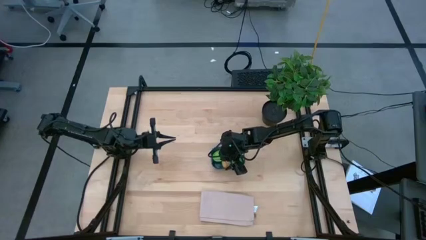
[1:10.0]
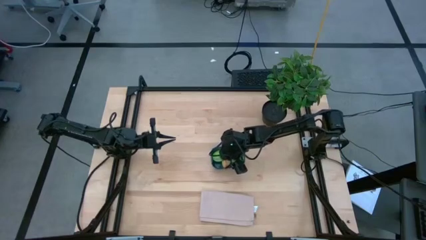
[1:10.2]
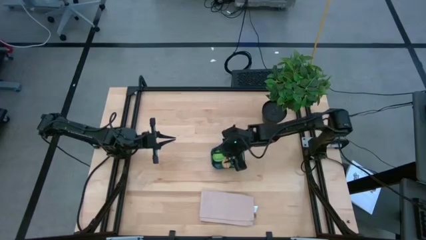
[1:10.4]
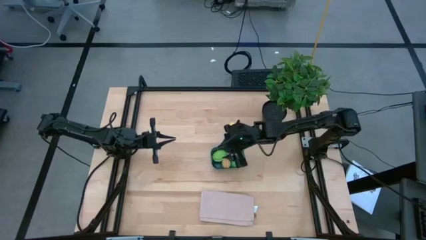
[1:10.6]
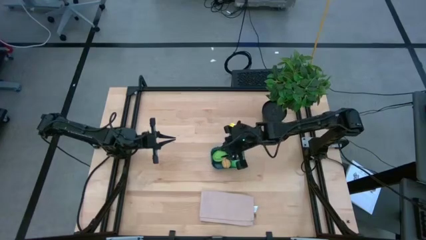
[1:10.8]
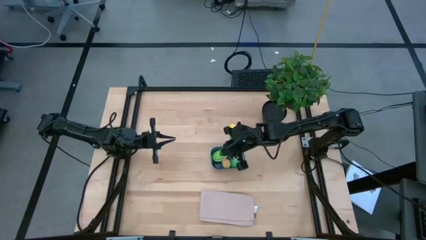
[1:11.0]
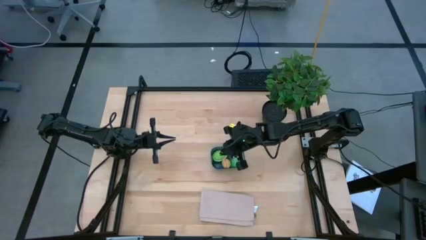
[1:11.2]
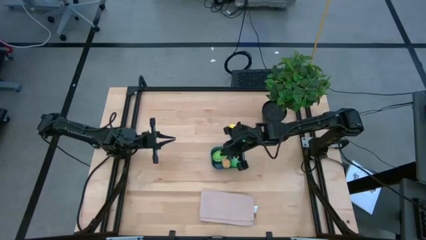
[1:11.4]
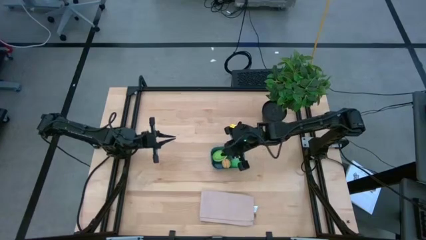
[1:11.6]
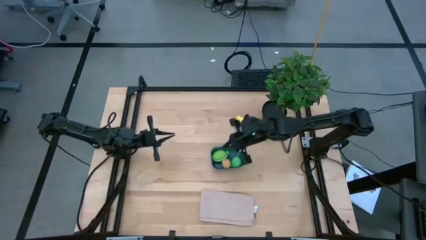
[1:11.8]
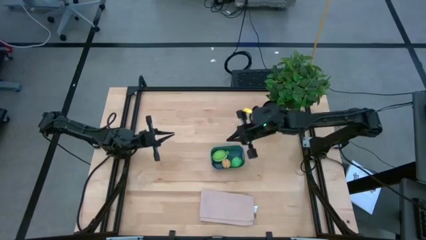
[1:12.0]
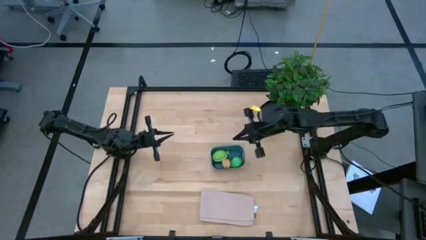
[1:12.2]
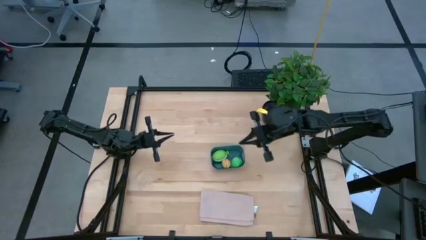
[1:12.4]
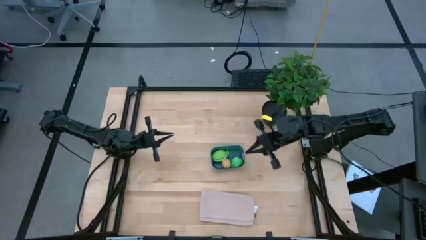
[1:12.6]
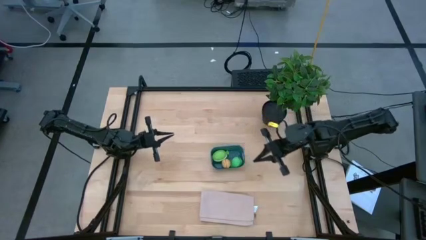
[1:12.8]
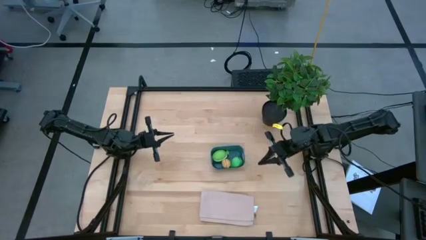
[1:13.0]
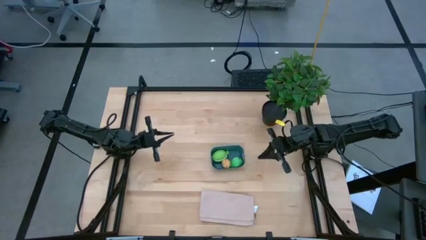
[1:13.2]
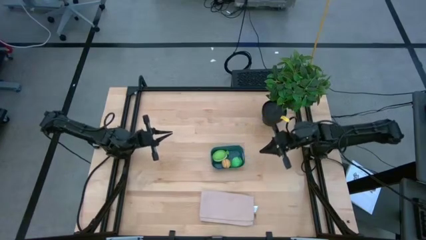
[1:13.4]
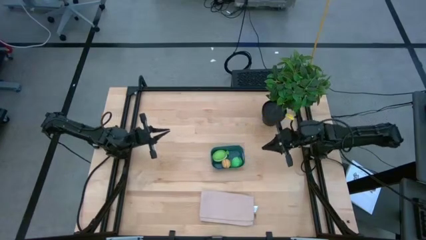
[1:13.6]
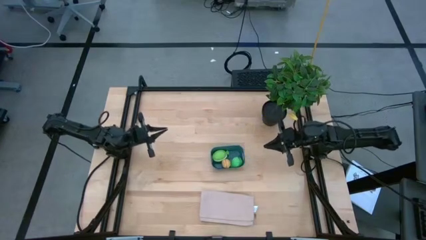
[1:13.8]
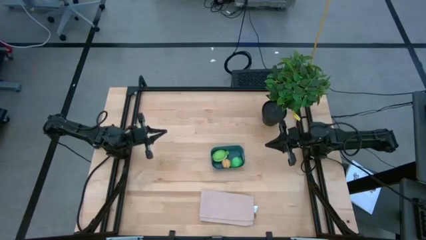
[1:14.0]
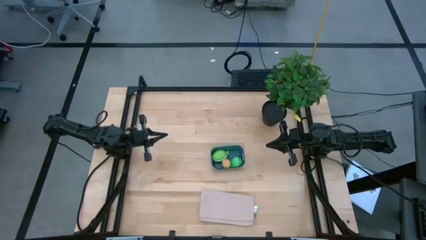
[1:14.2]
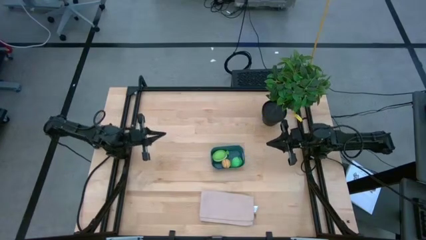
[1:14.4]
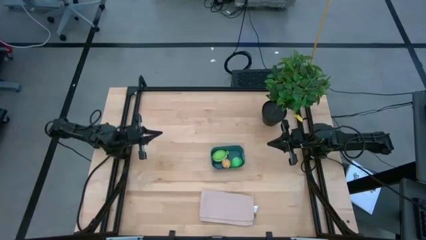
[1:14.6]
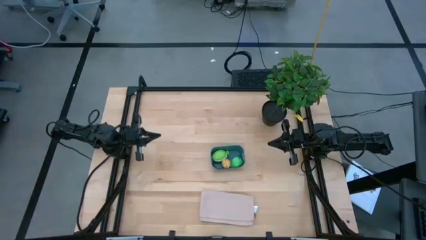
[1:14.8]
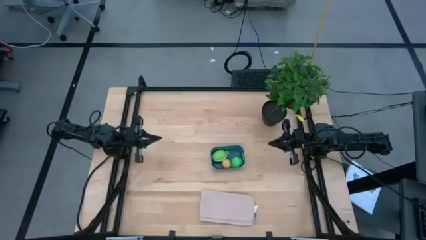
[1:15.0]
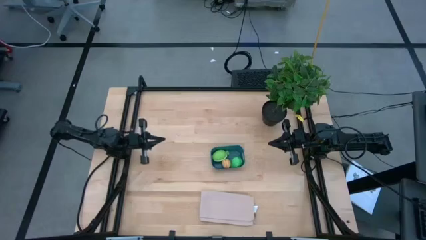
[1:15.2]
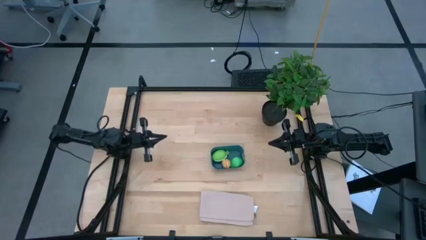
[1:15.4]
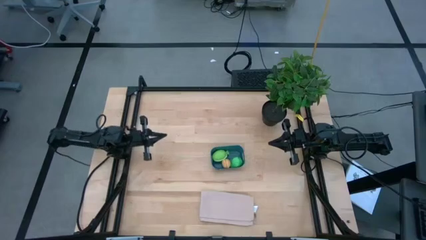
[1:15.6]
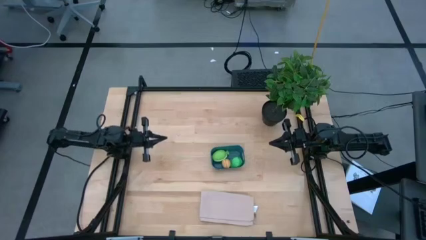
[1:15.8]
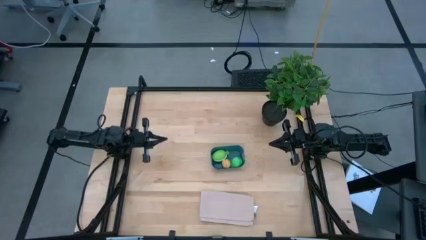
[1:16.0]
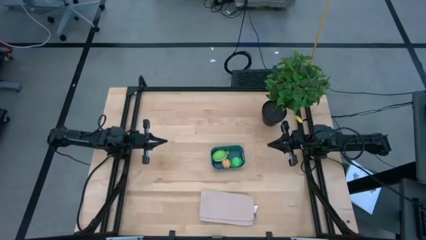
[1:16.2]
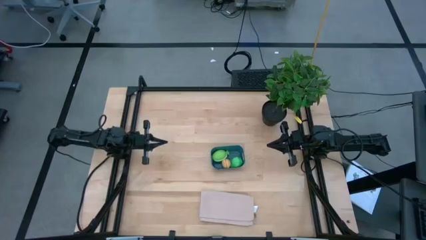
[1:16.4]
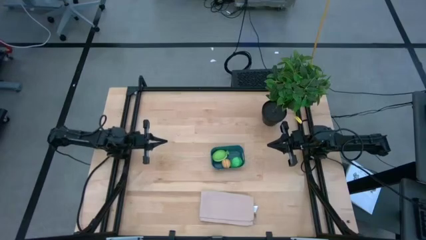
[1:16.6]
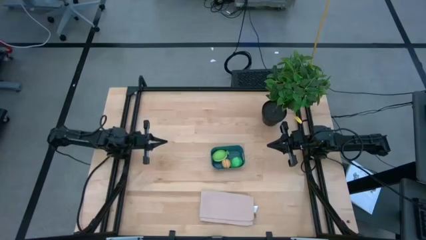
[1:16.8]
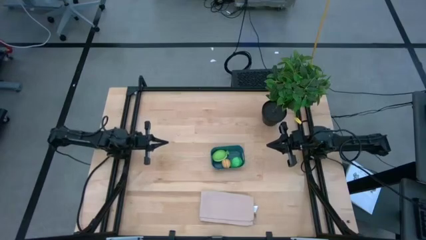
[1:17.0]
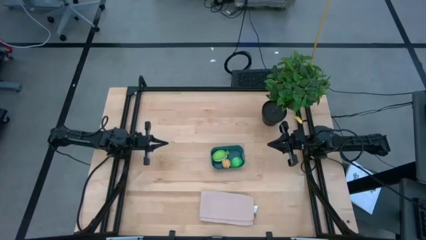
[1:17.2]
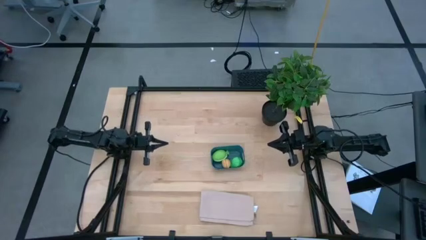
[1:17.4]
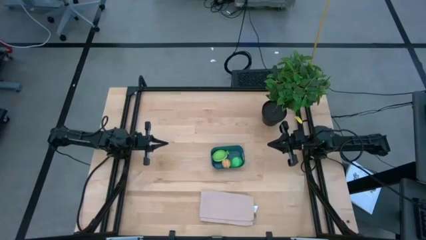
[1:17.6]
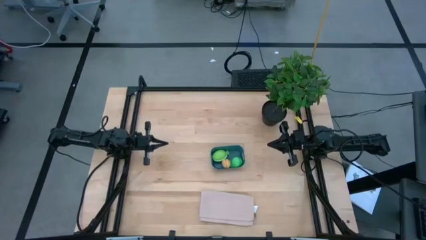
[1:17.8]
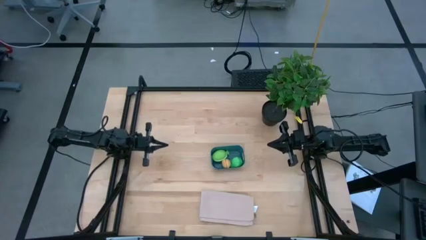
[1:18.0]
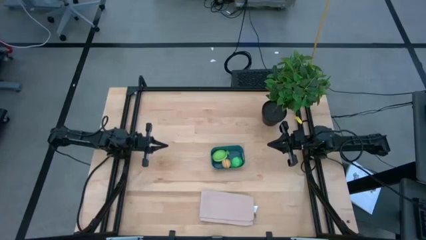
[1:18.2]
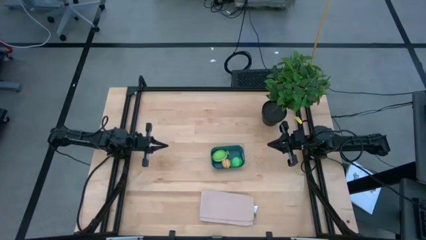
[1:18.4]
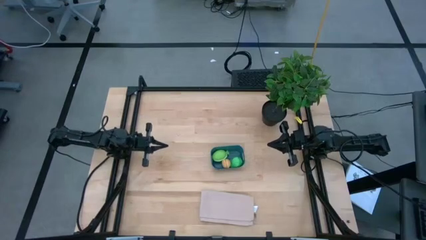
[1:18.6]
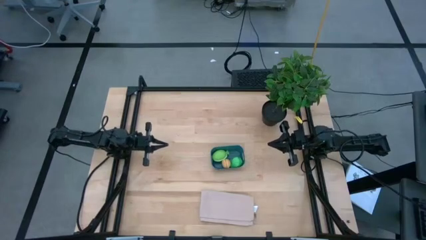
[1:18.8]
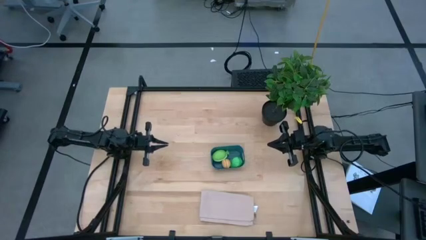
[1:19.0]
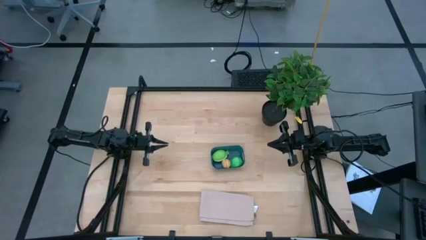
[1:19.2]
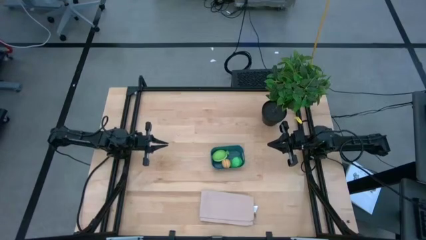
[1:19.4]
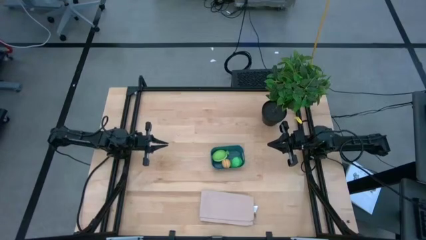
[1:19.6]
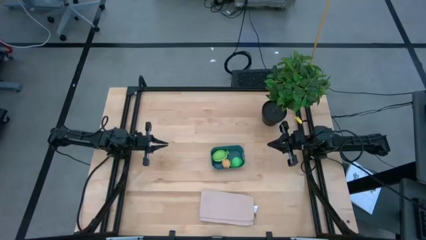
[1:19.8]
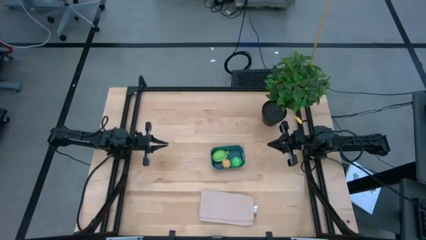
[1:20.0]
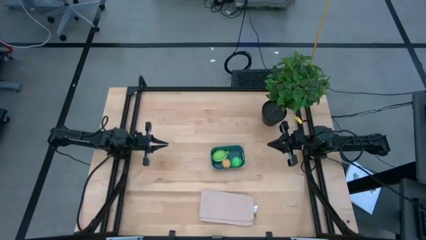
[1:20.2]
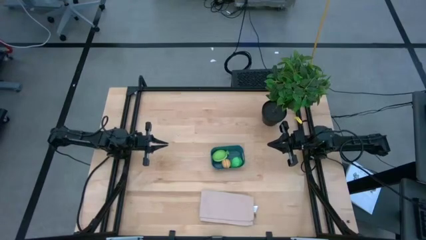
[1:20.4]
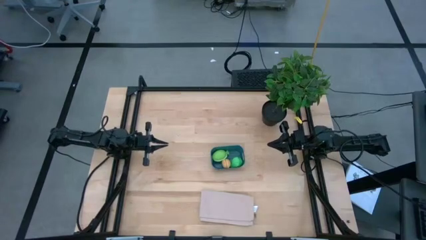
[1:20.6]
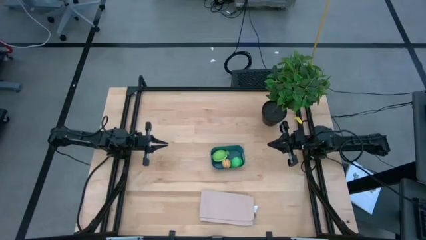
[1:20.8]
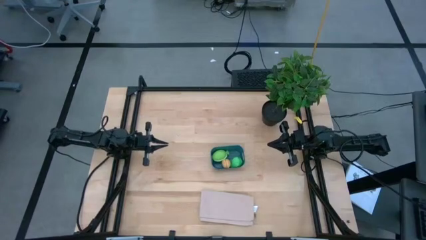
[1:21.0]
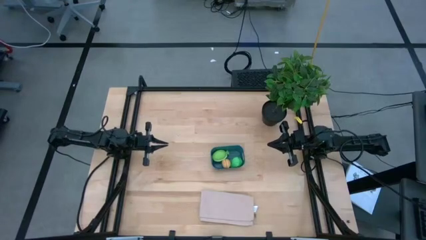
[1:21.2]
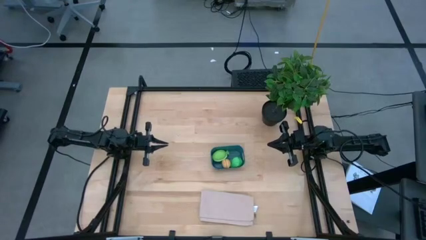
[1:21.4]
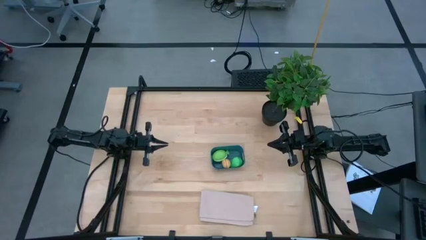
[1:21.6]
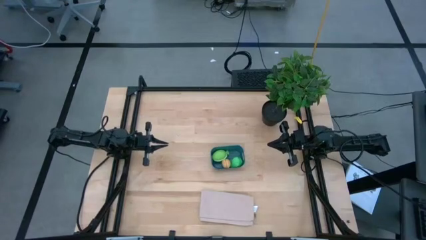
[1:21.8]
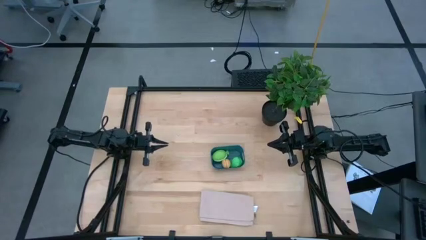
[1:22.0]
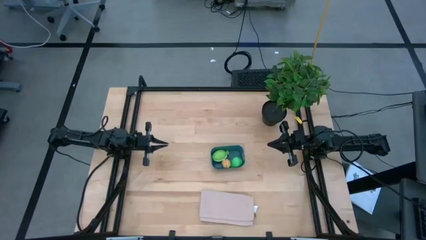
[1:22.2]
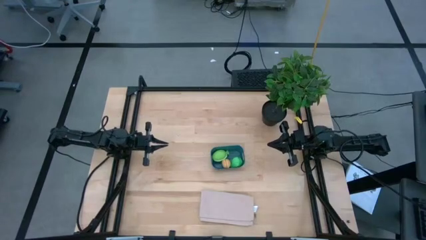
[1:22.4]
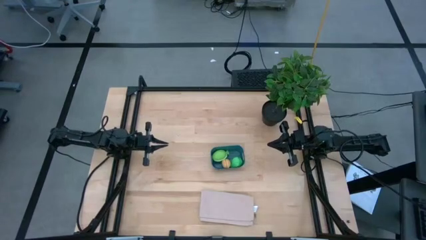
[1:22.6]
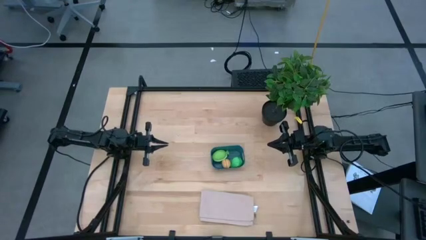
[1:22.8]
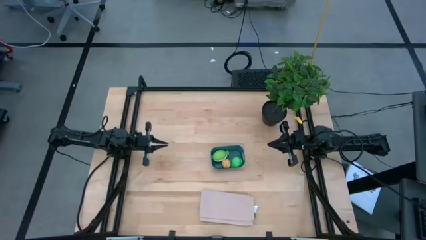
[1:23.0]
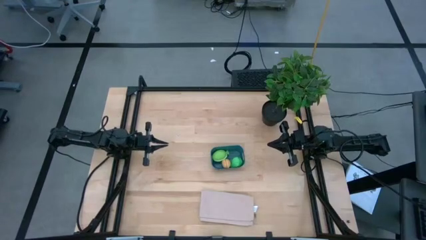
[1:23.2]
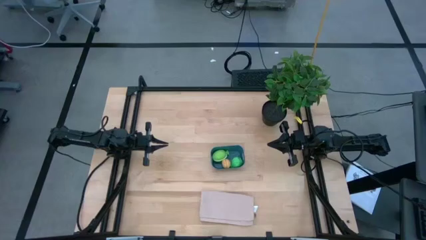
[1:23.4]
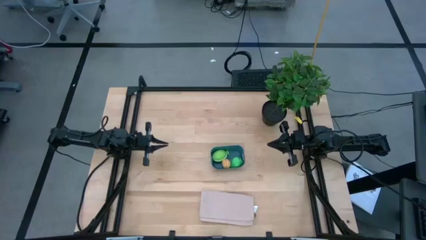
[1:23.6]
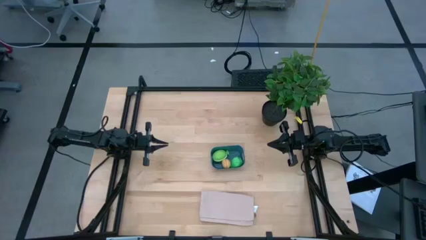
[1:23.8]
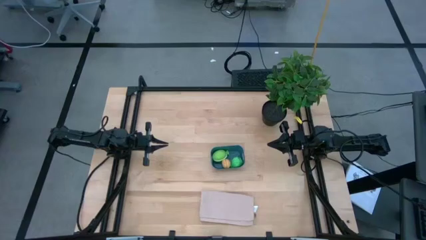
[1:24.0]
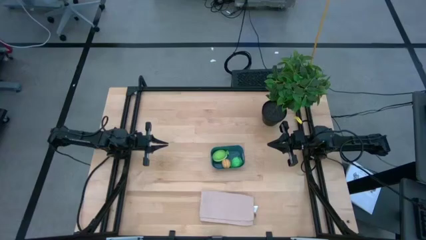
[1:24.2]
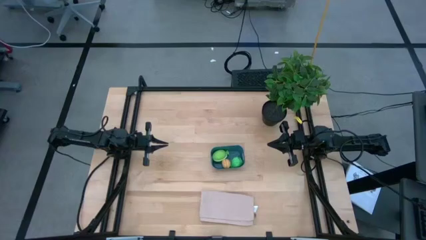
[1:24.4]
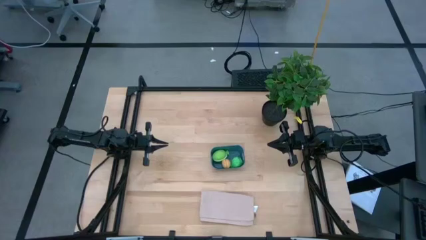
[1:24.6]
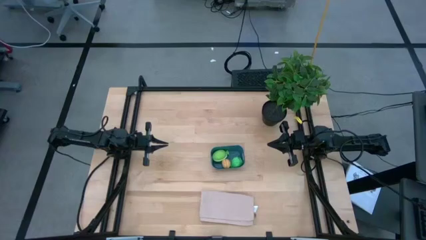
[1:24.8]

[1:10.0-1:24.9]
Task: Pick and placing Produce into tupperware
Return to Home Position

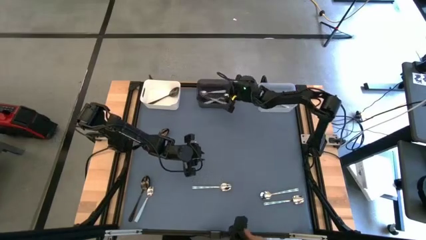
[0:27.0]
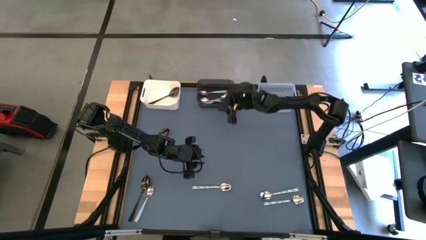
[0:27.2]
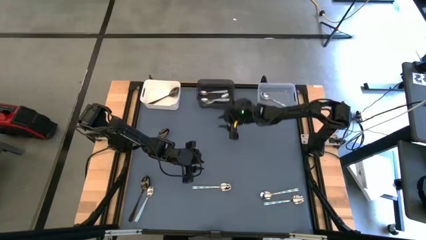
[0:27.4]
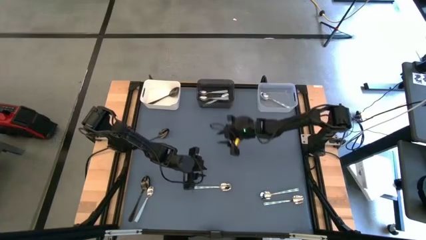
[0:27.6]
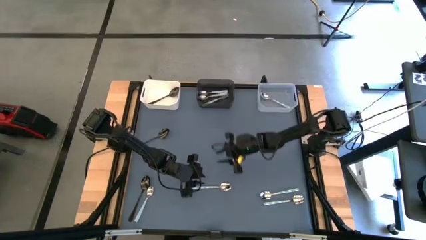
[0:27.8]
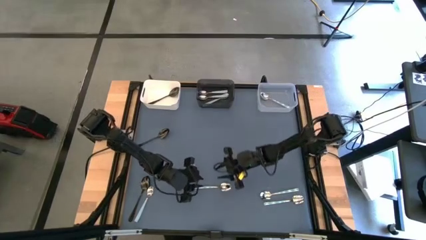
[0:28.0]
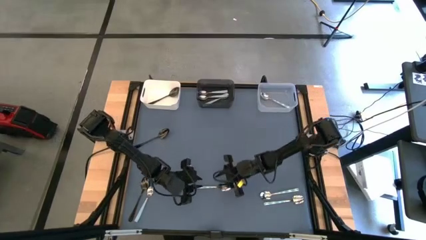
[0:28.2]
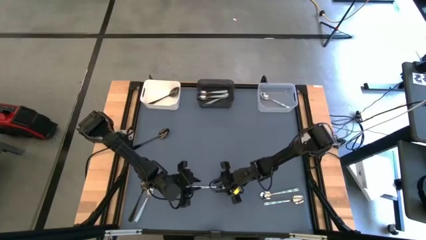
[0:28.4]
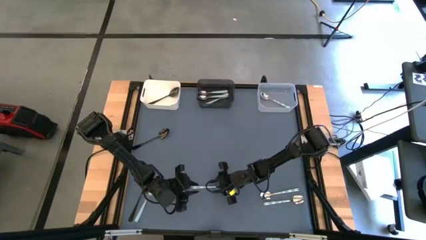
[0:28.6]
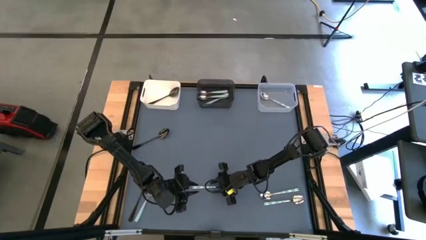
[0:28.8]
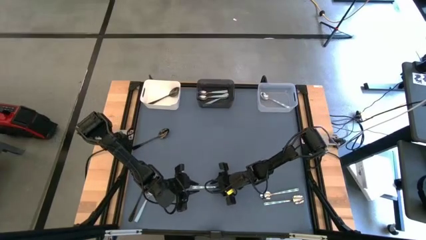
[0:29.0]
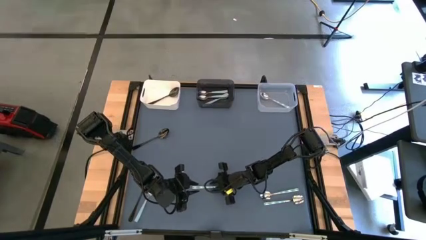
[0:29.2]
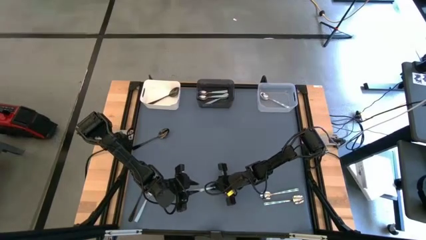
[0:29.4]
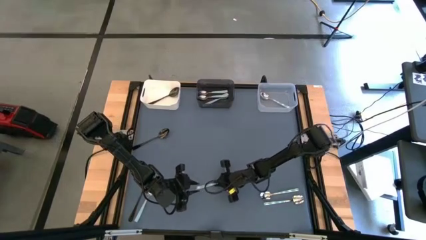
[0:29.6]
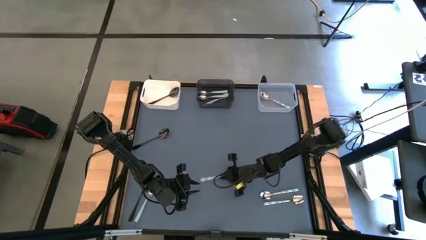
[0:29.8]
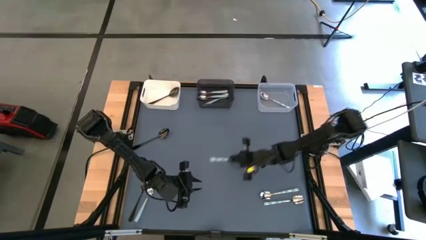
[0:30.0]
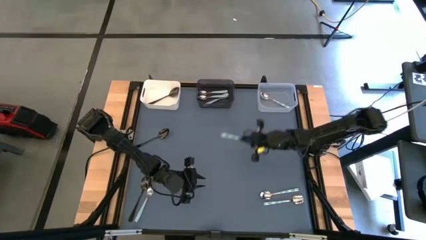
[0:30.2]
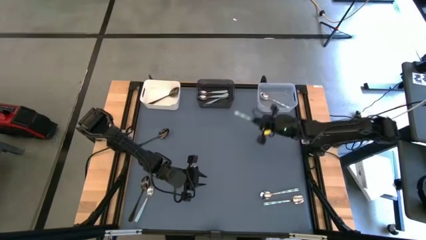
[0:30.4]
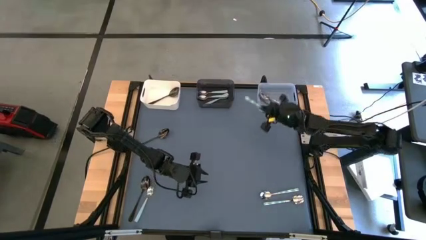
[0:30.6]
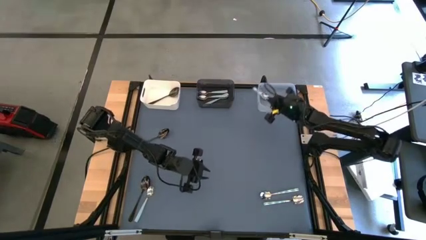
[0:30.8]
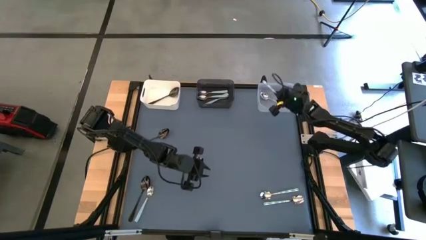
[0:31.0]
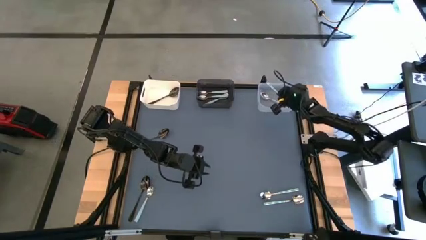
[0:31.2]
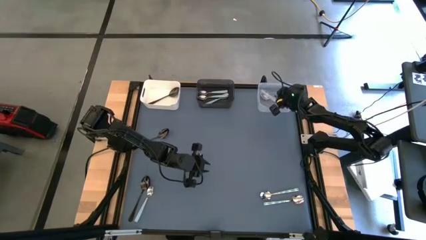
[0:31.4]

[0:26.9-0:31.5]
Task: Sort silverware by color (type)
Put the bottom middle white and blue patterned spoon into the transparent bin
